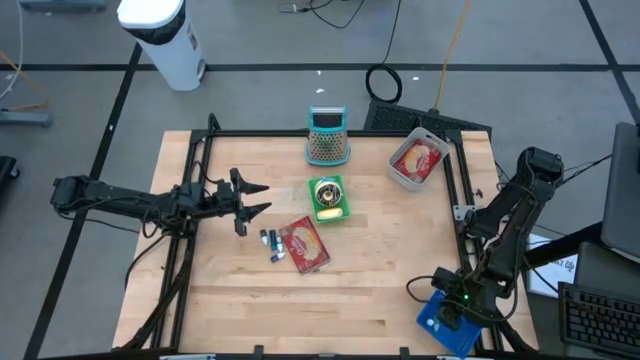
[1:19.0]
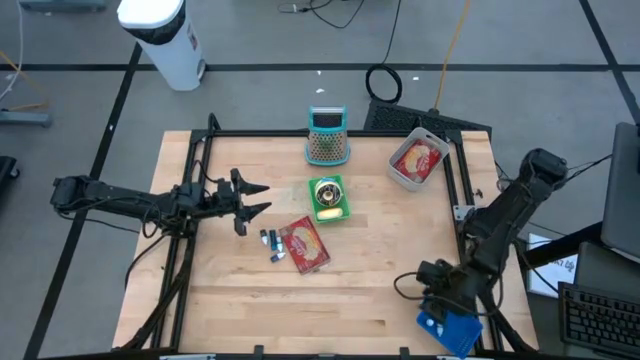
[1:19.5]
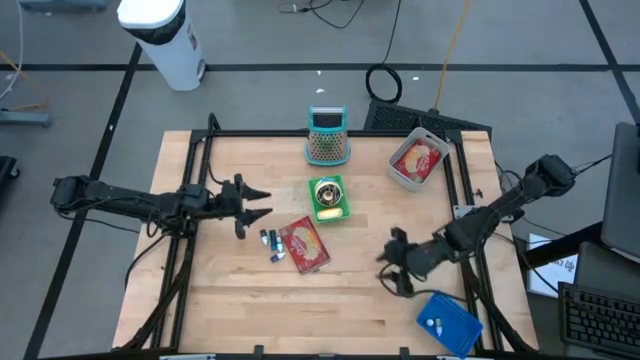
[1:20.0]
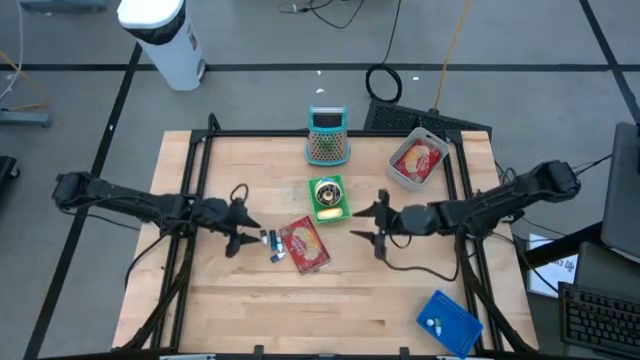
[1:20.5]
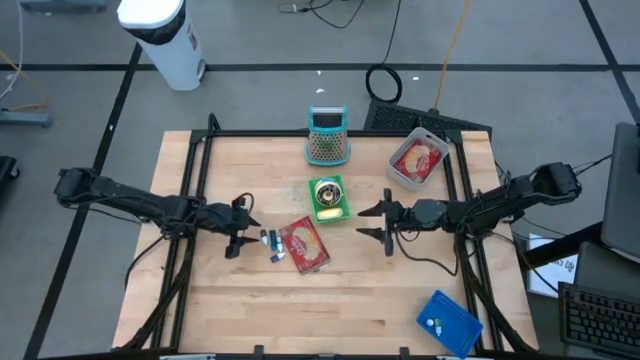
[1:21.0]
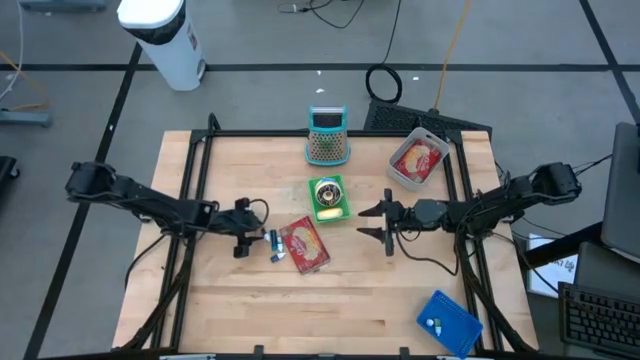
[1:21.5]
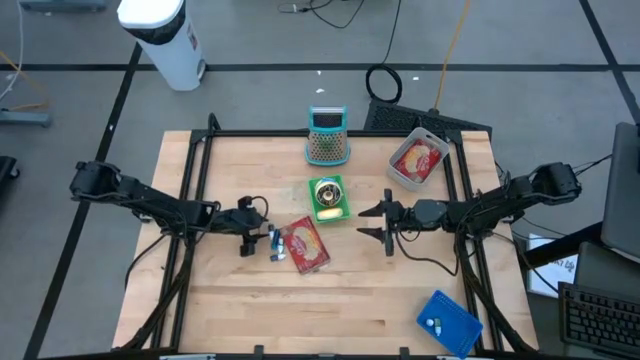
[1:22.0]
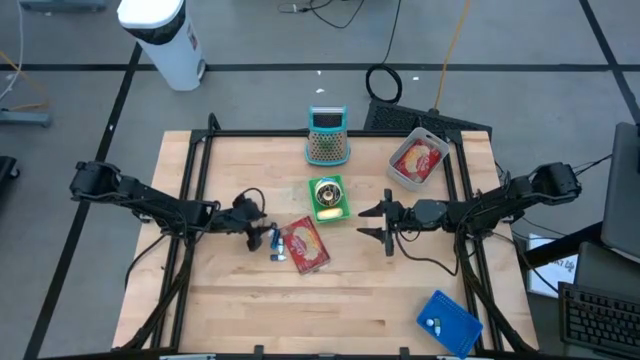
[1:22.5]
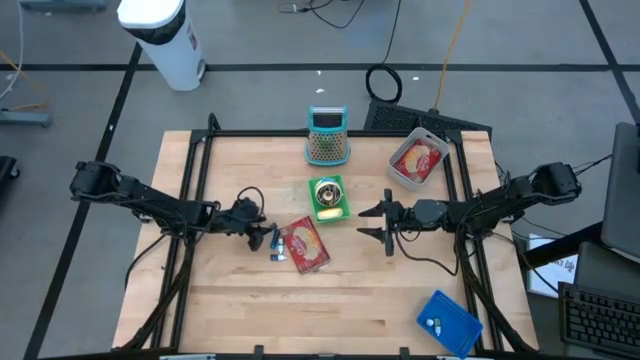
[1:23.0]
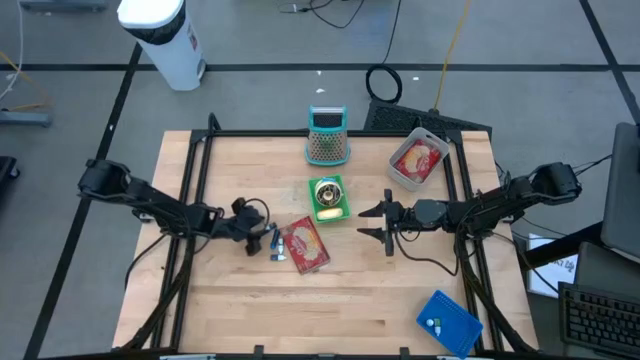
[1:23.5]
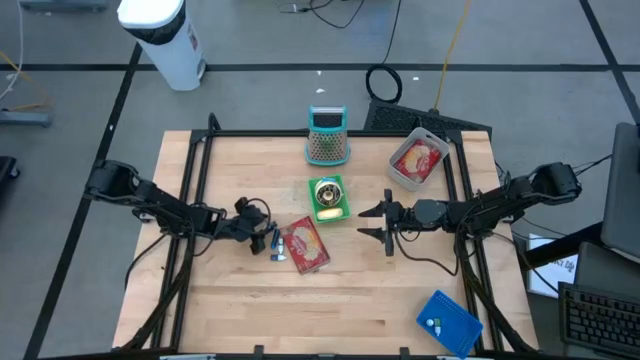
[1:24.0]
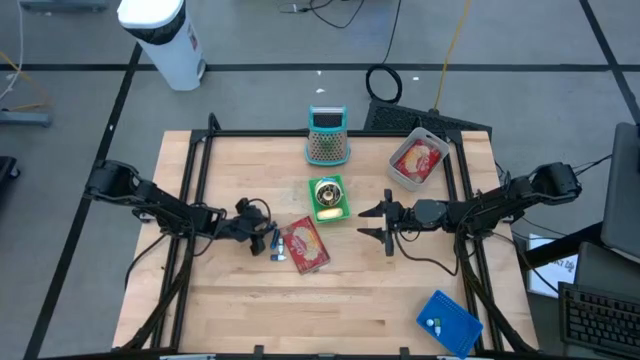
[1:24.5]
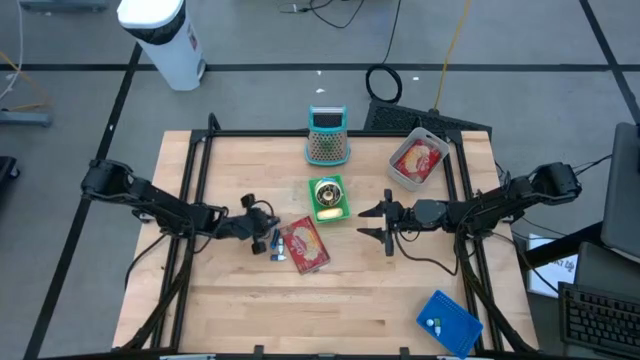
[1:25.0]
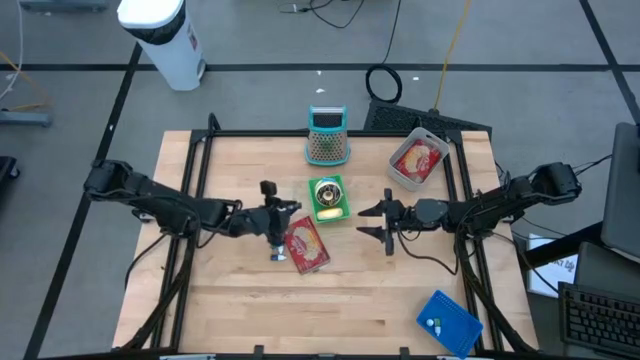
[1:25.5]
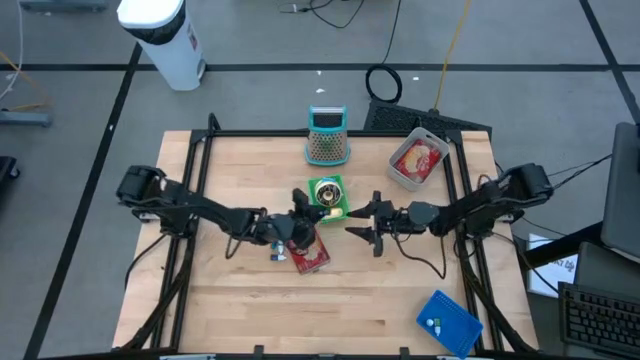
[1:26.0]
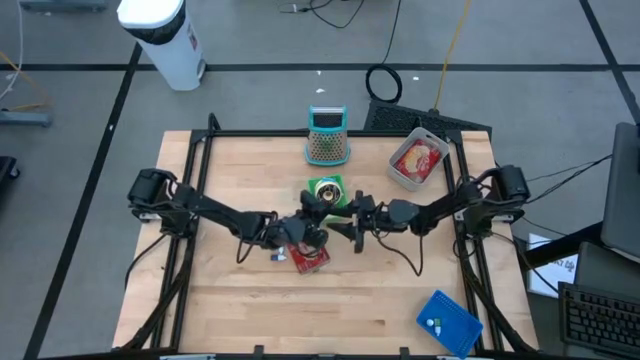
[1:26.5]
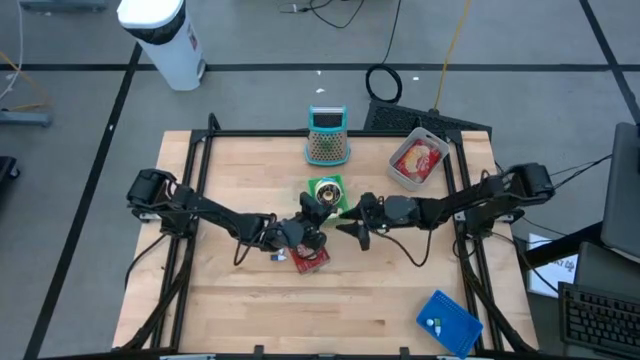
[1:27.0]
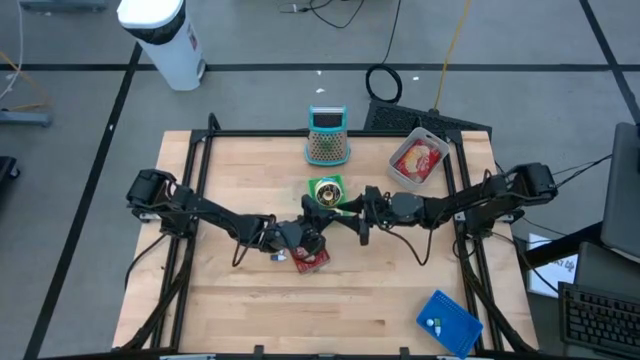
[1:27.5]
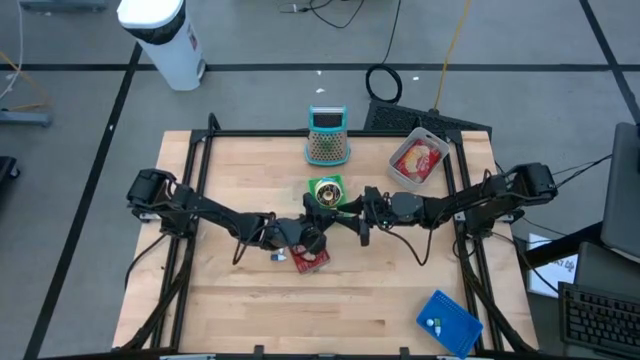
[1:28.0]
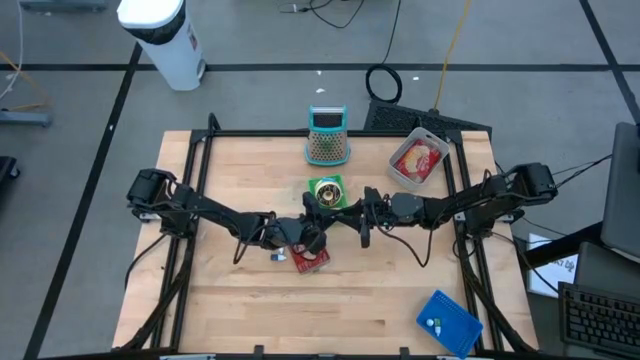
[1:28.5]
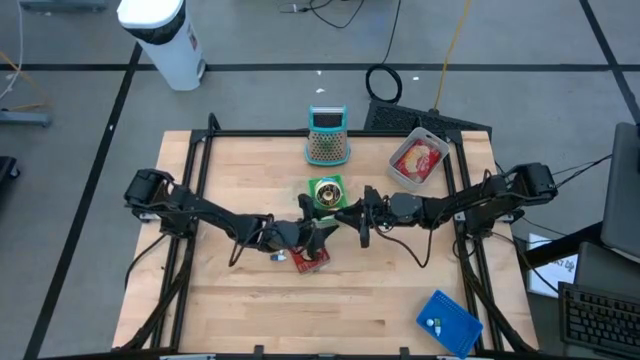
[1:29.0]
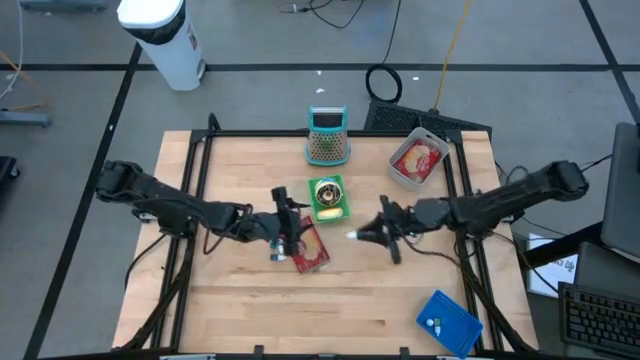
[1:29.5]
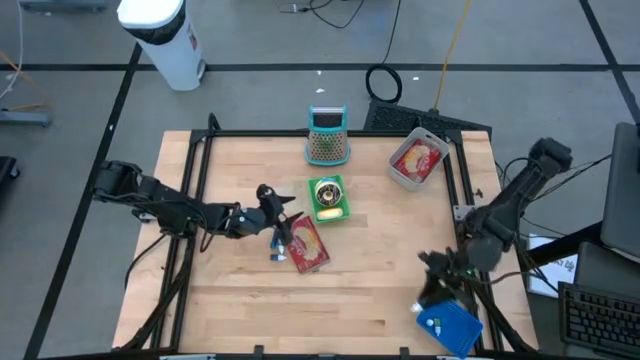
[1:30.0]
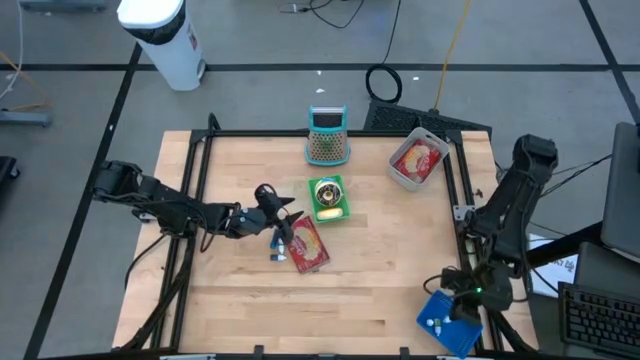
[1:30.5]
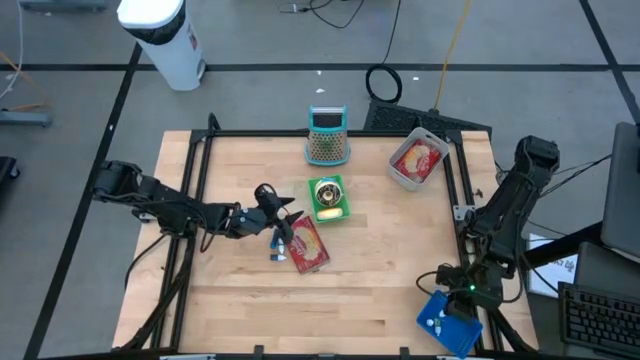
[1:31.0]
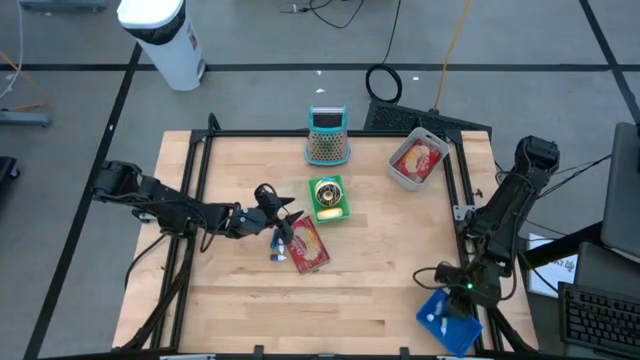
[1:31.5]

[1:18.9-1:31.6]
Put the purple food coloring bottle into the blue bin

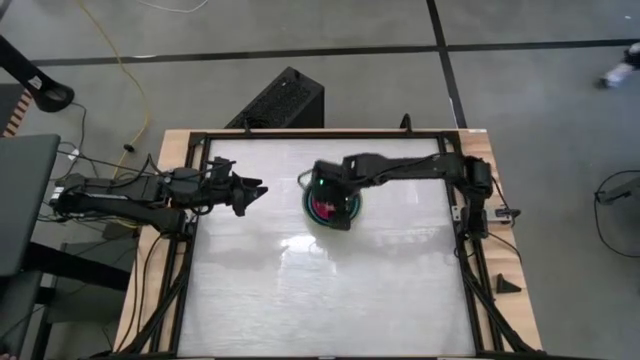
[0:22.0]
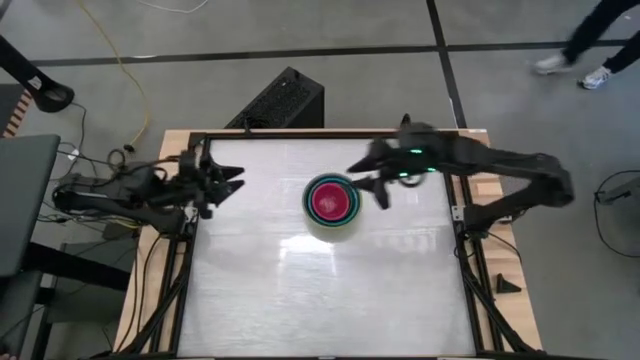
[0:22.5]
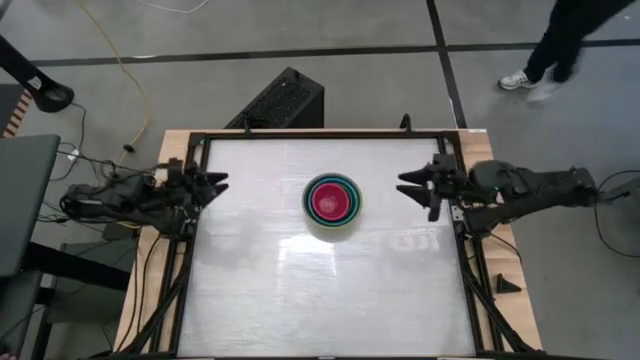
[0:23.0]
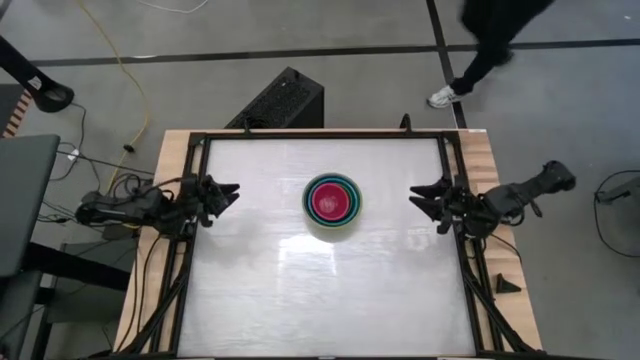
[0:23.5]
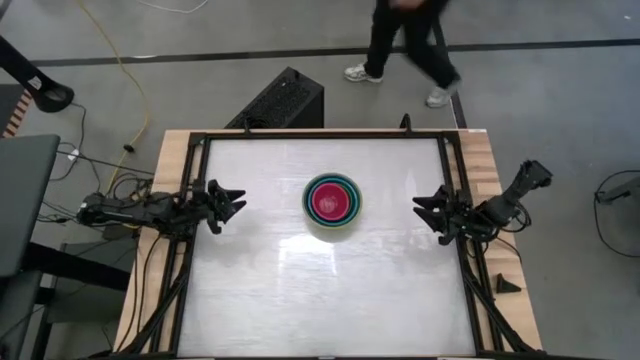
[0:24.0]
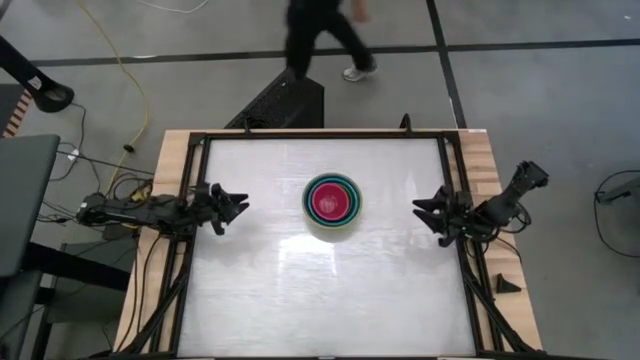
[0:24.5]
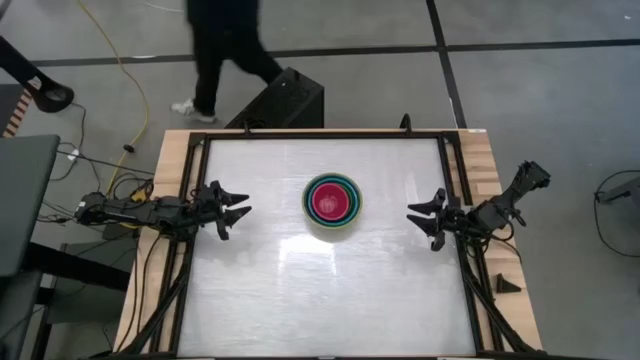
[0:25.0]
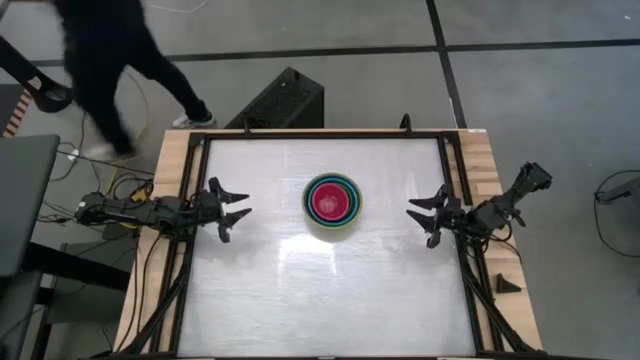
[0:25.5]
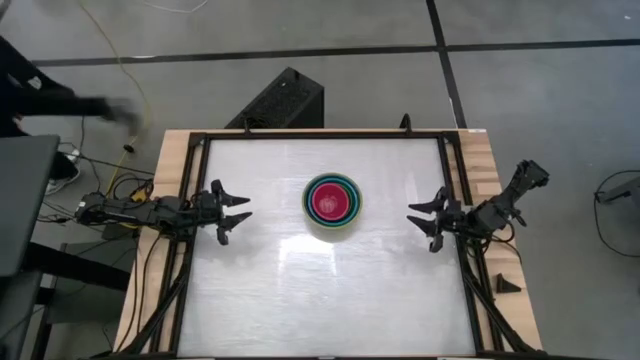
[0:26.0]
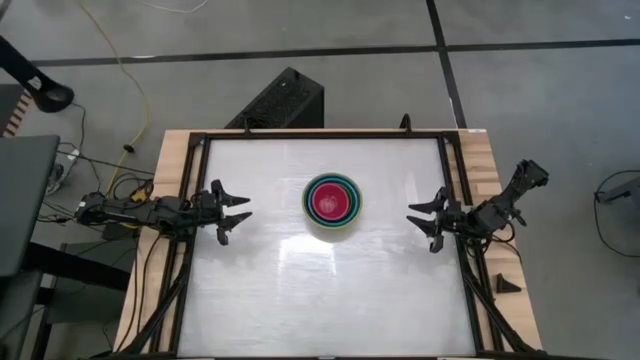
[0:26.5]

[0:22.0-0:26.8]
Return to Home Position
